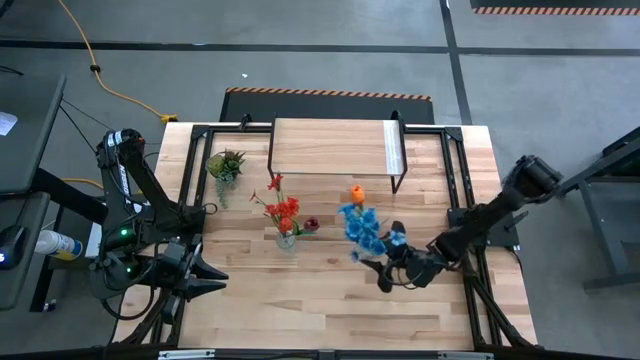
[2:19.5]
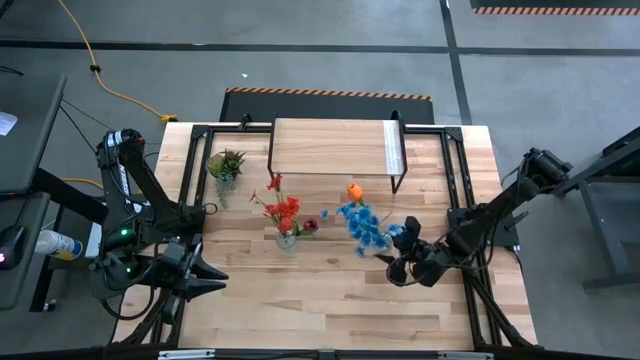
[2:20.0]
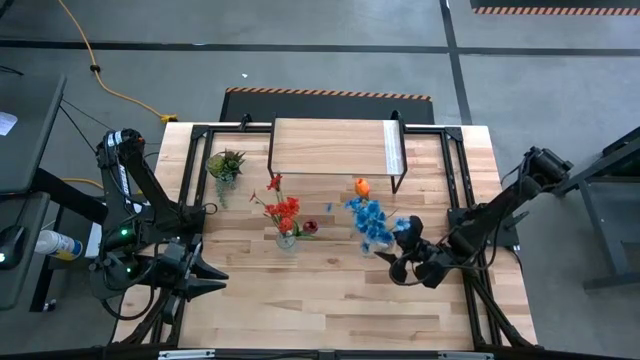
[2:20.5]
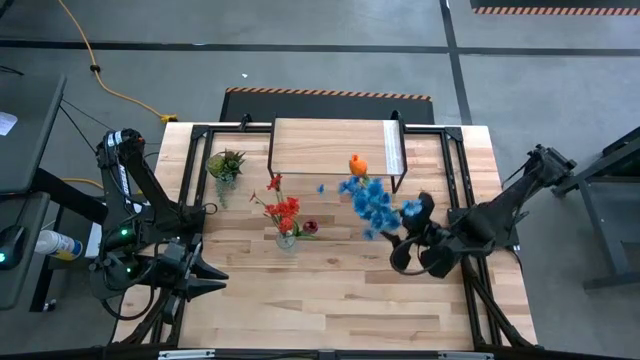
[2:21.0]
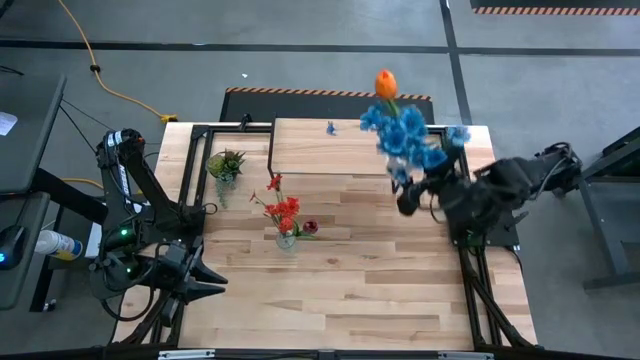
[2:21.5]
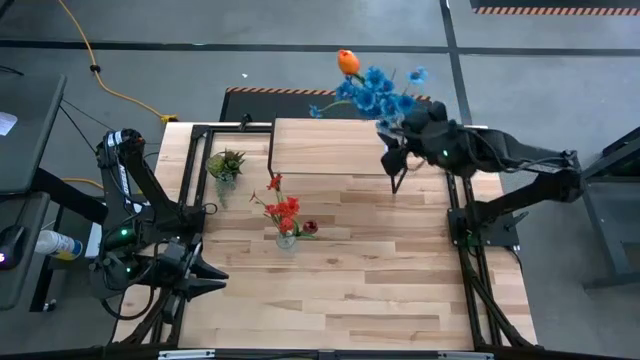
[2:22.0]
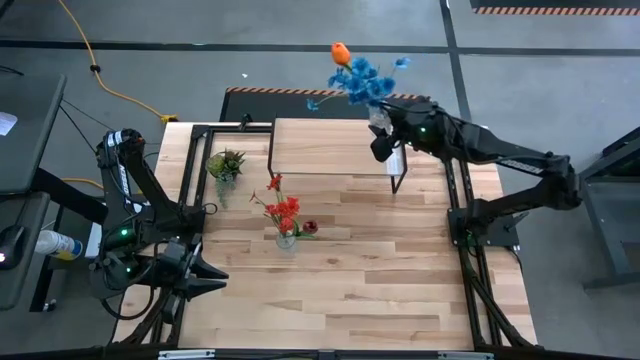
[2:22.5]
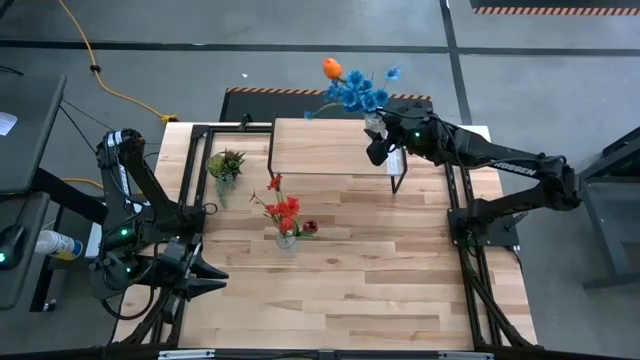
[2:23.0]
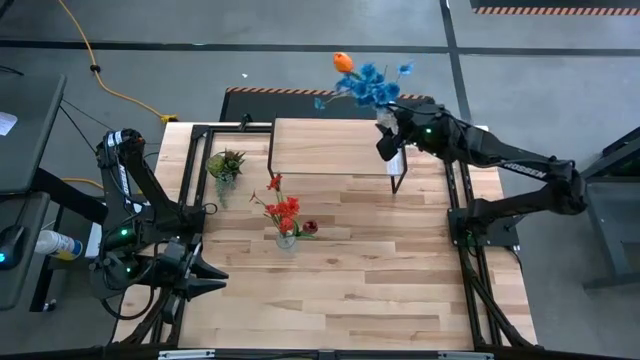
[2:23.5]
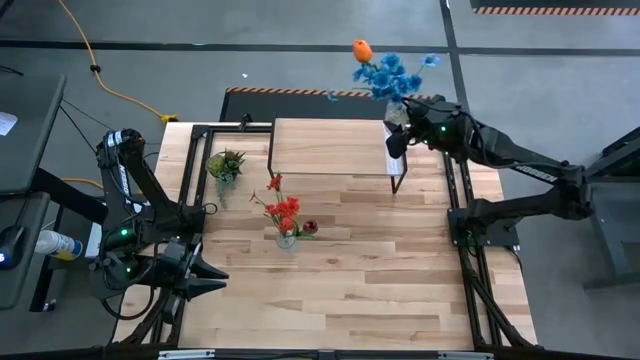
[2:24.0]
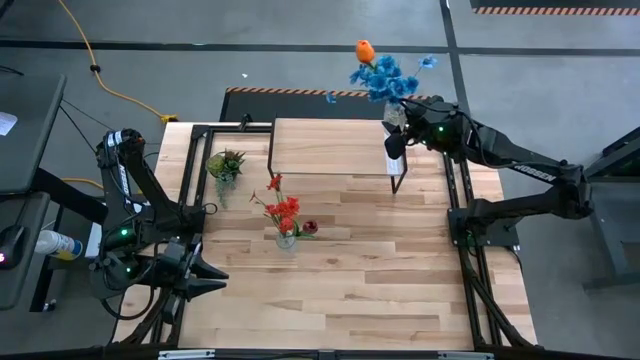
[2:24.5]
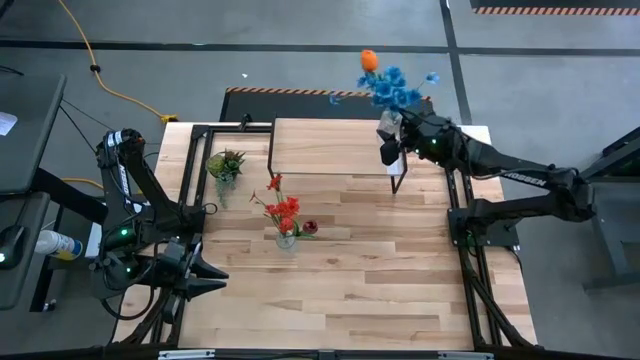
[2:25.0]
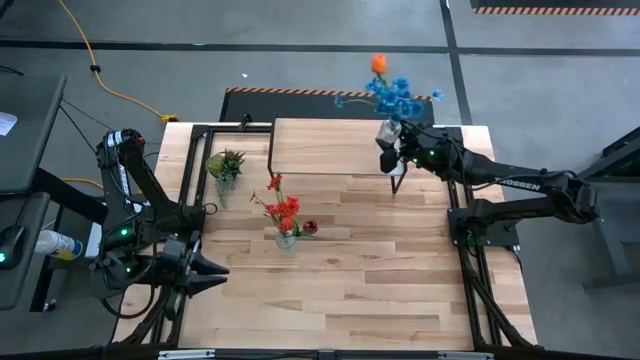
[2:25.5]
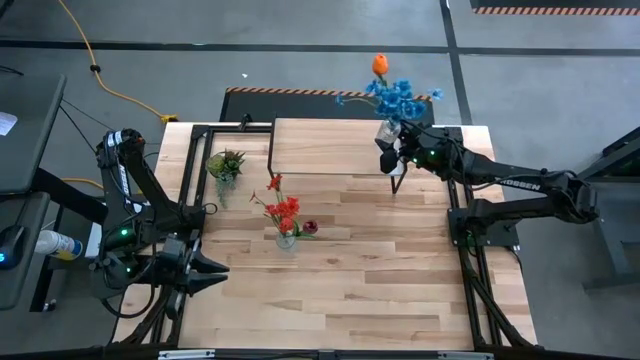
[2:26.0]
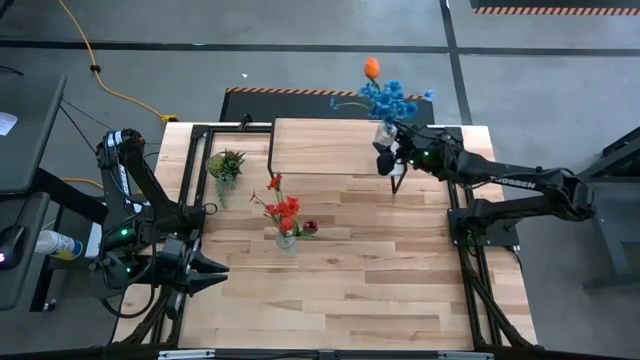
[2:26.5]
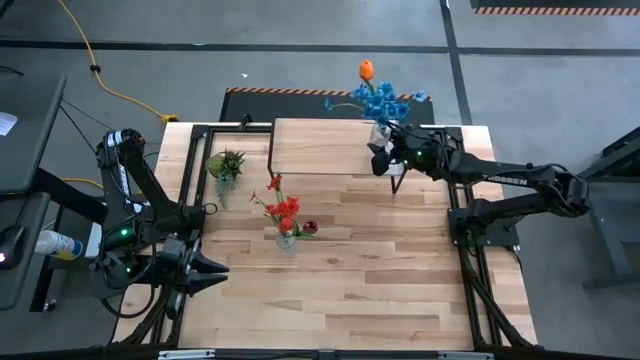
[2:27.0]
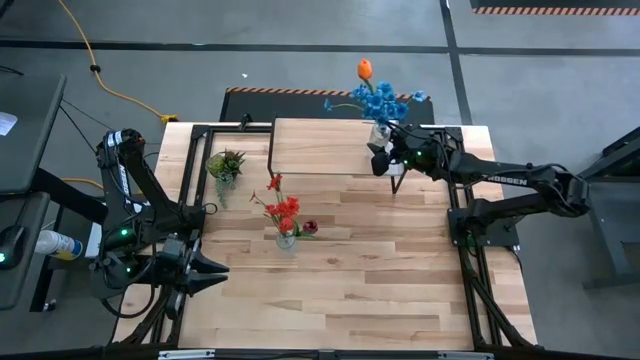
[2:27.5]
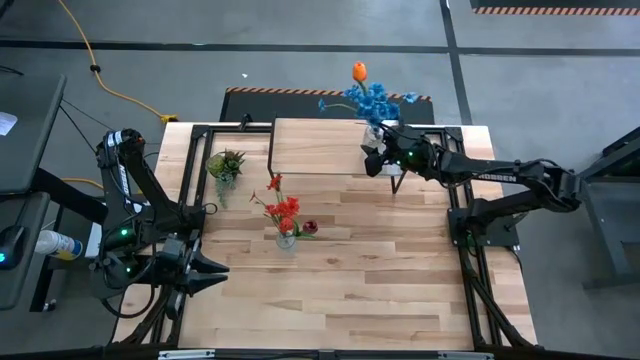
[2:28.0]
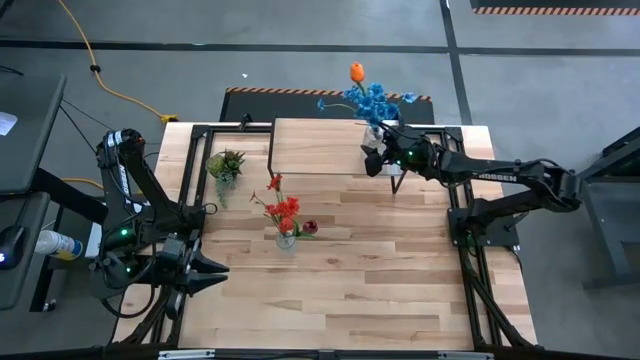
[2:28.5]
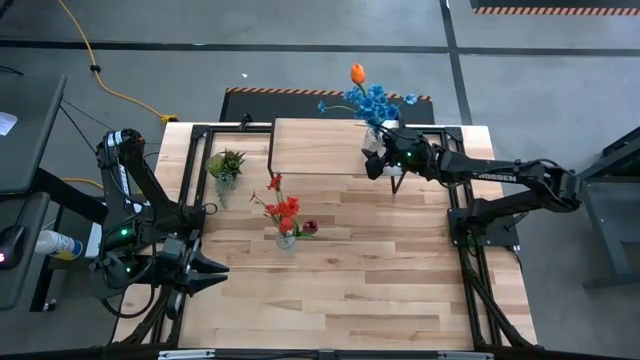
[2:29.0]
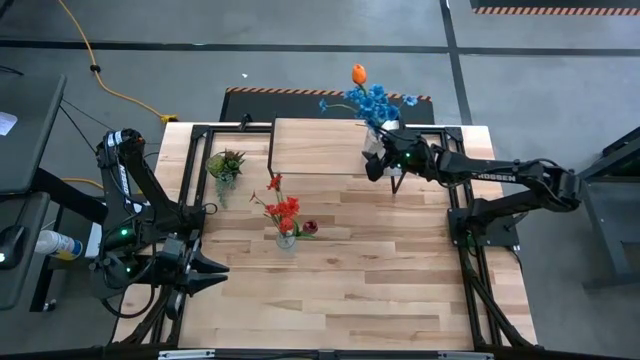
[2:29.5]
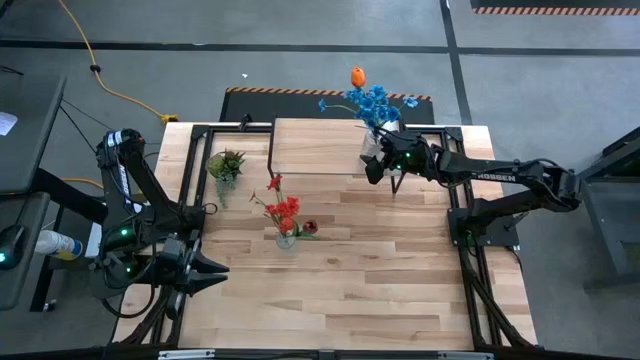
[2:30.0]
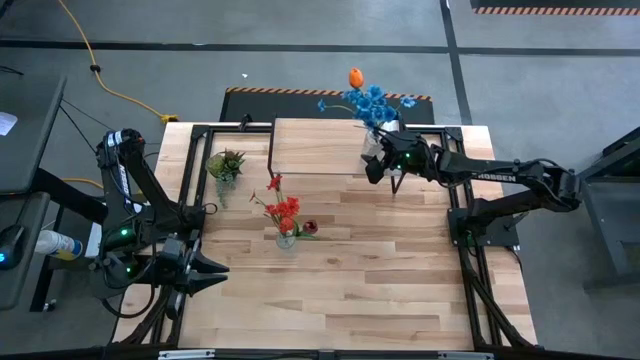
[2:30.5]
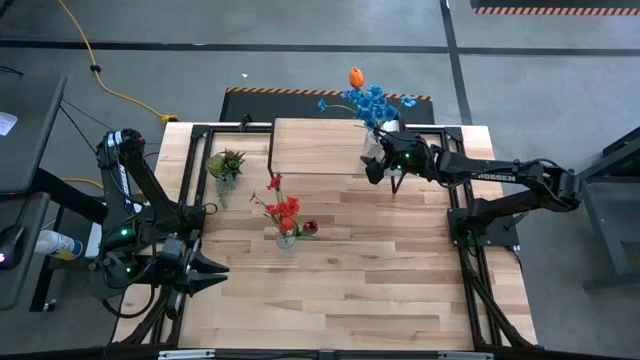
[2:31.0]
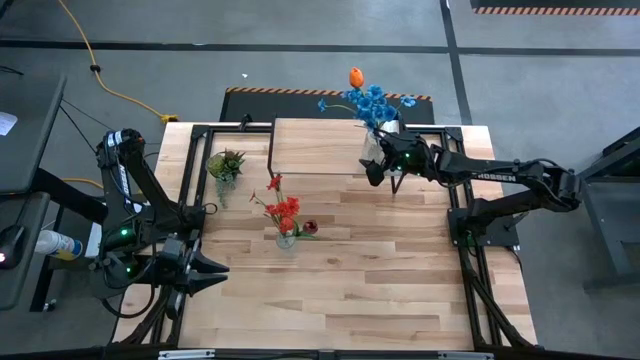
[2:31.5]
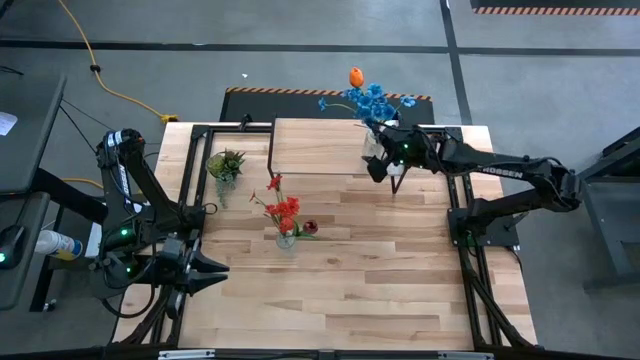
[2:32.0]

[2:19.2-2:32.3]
Task: Pick and place flowers into a vace then onto a shelf
Put the right transparent vase with flowers on the shelf
